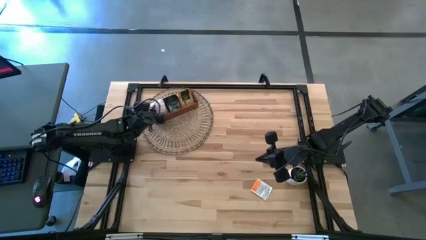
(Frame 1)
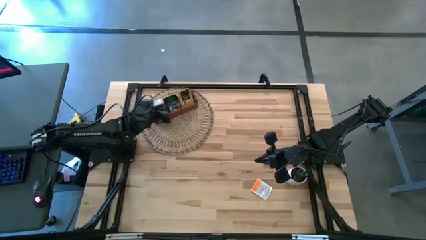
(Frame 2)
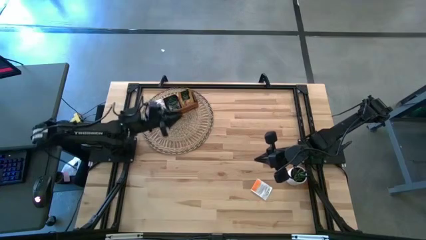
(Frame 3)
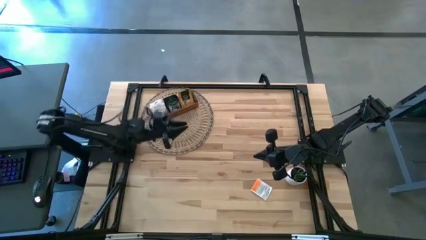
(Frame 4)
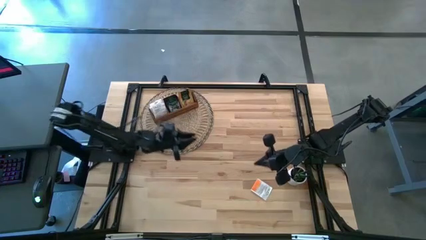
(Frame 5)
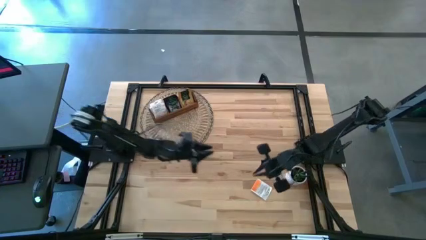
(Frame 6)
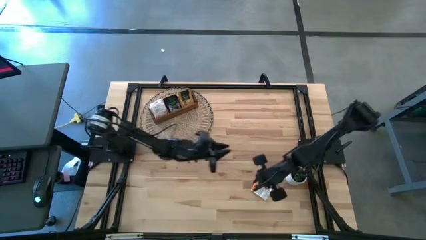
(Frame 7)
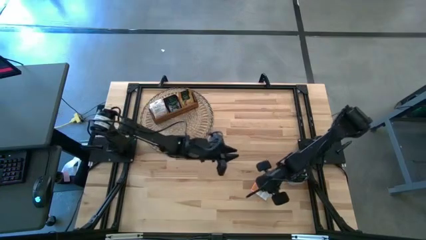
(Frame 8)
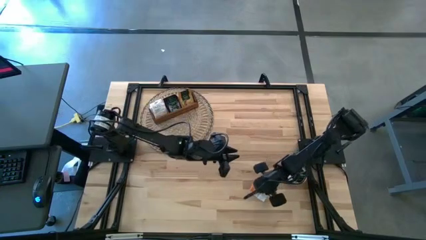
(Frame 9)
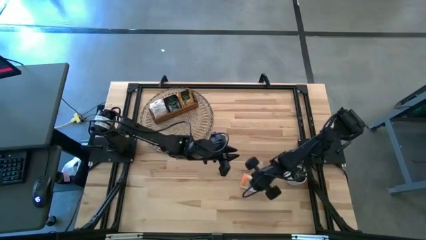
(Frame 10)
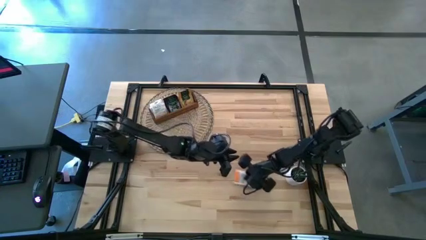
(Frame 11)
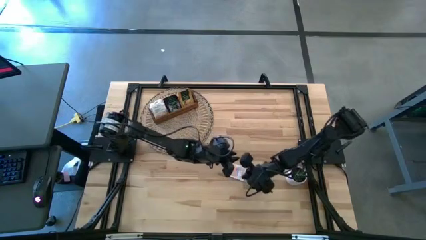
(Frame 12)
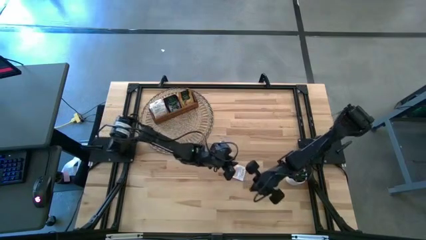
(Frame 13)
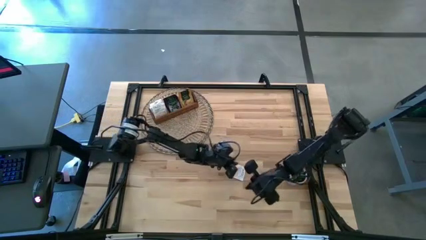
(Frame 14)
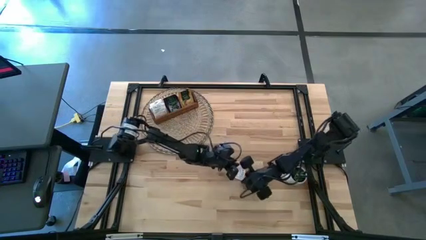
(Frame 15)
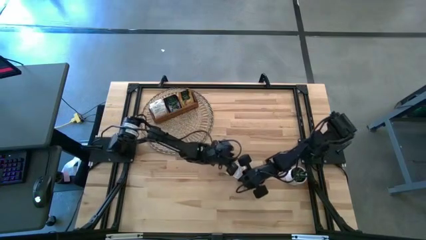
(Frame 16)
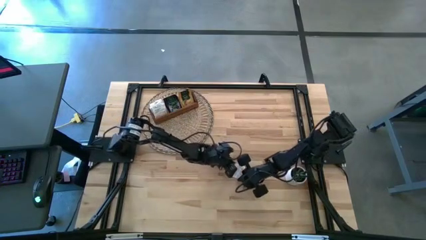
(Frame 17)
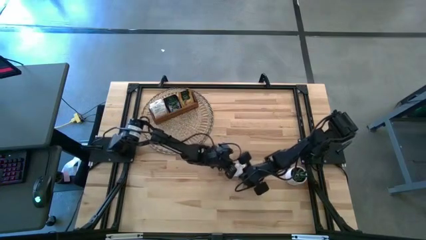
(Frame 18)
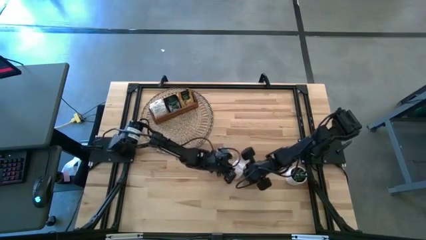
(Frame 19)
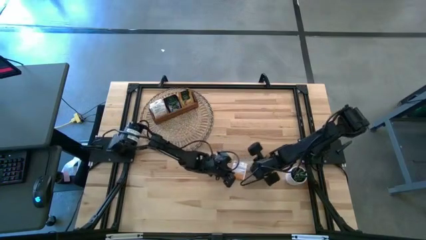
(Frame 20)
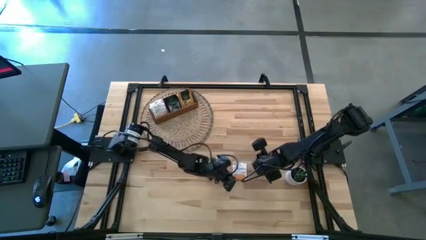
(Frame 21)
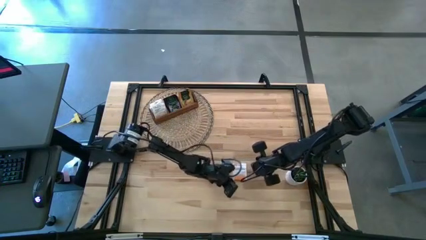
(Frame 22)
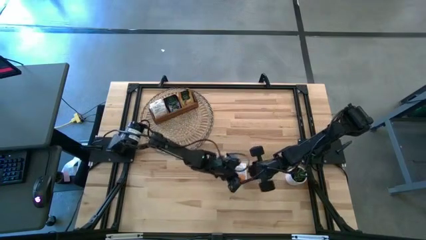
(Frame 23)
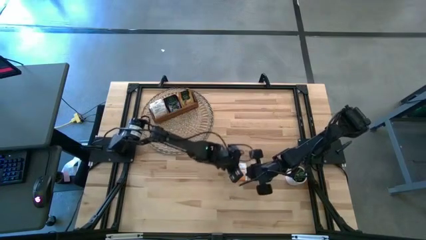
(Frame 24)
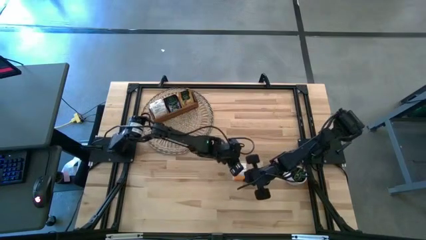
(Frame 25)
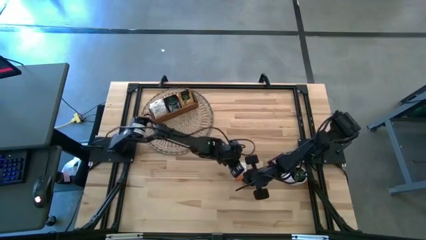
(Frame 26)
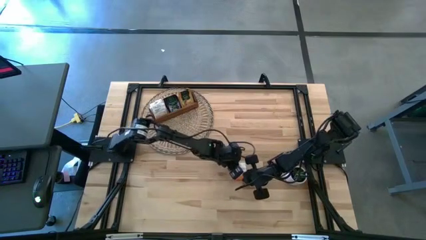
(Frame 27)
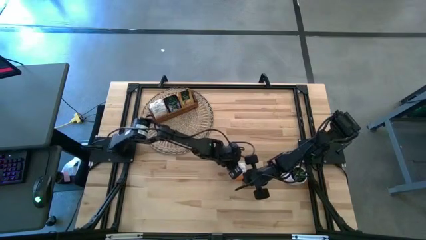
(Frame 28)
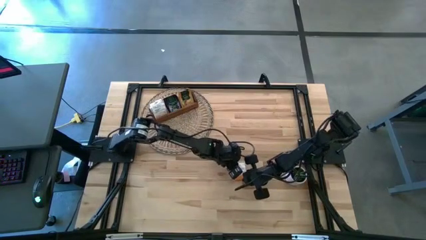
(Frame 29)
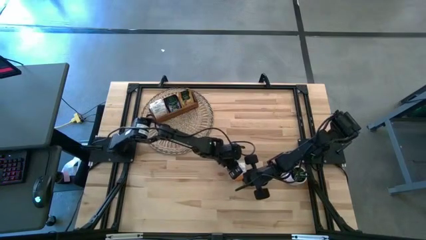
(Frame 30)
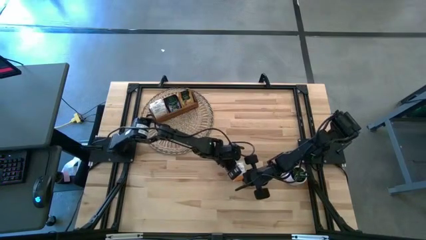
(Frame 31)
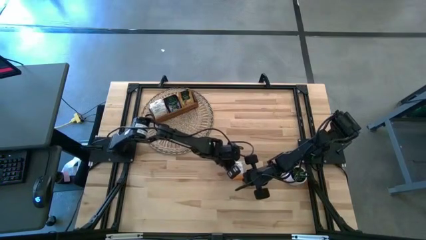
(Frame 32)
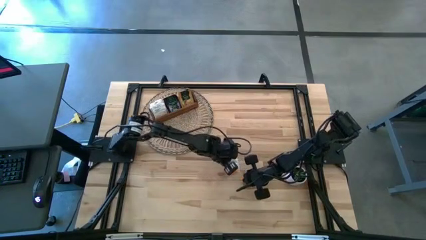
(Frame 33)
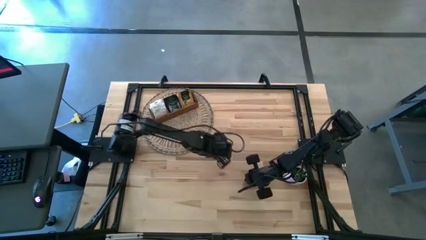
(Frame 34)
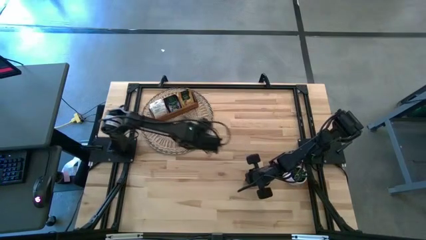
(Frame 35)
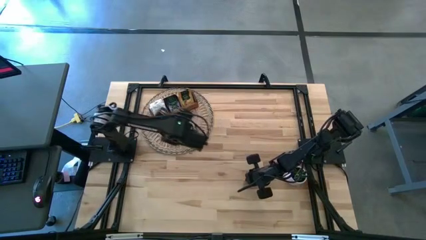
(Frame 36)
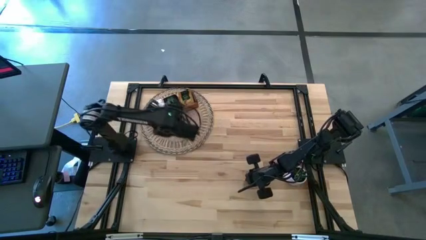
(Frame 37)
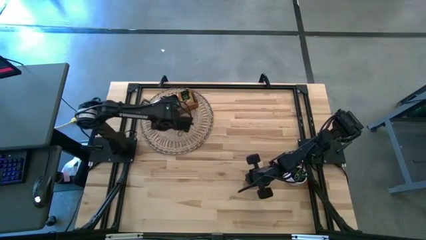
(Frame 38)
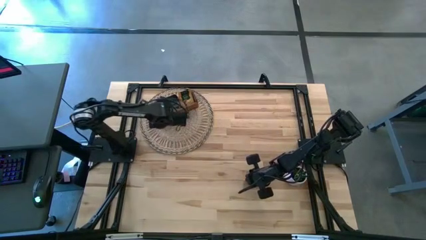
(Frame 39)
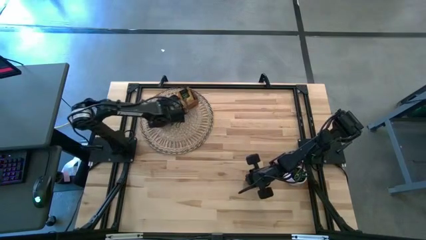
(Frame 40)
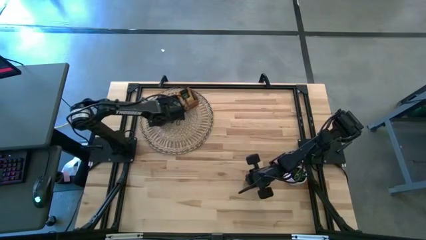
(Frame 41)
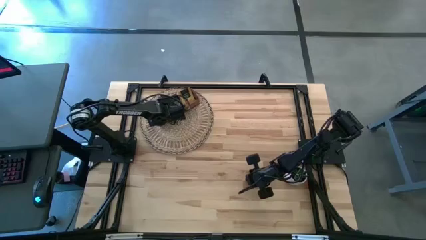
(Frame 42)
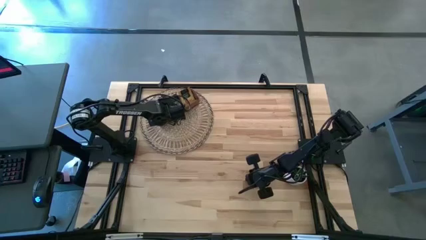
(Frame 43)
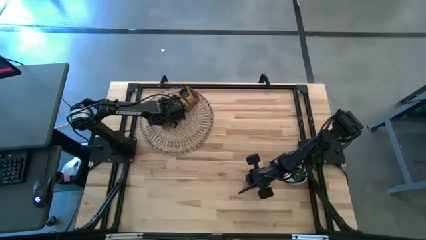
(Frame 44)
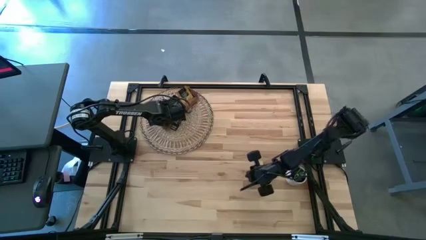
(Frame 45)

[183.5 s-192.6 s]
Task: Pick & Place Tea
Put the orange tea bag into the left section of the wooden organizer

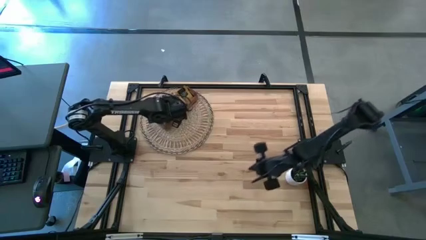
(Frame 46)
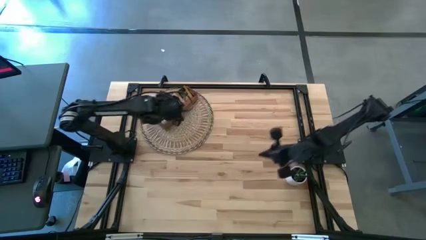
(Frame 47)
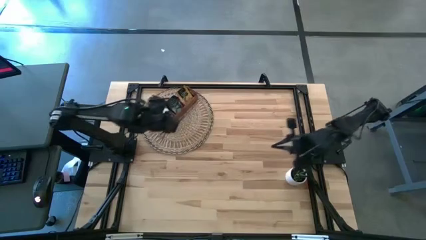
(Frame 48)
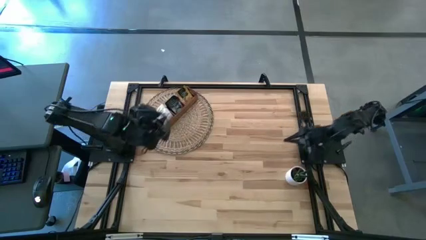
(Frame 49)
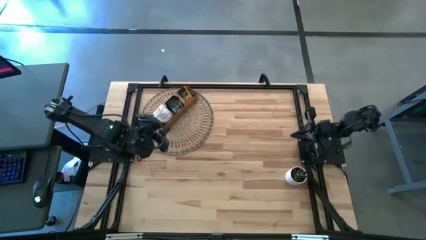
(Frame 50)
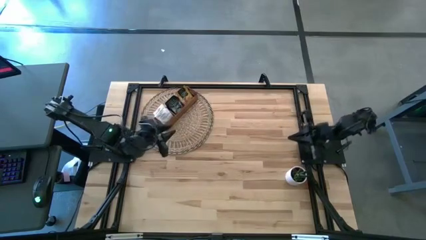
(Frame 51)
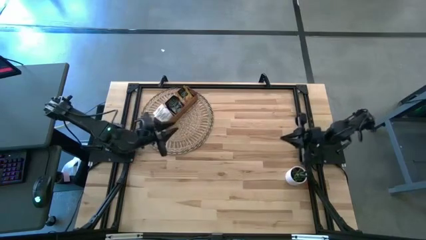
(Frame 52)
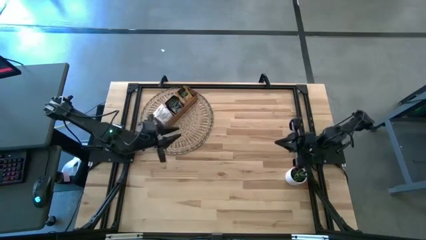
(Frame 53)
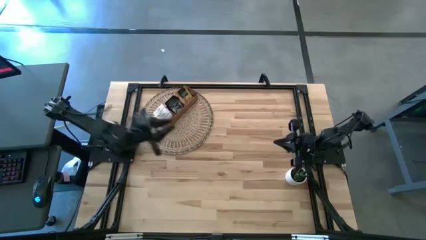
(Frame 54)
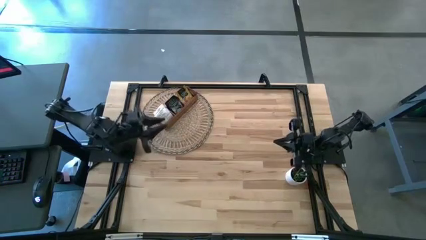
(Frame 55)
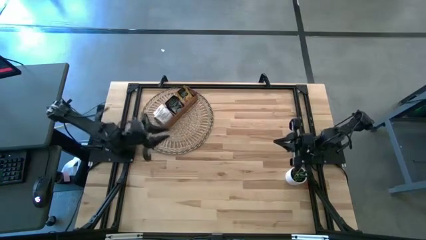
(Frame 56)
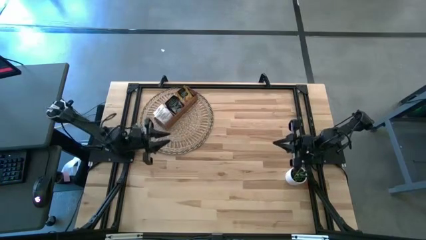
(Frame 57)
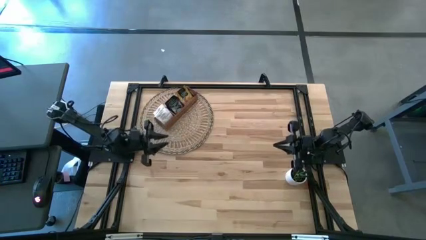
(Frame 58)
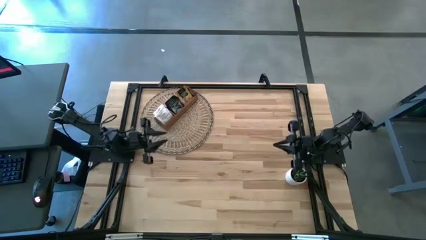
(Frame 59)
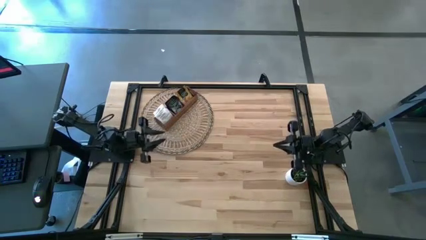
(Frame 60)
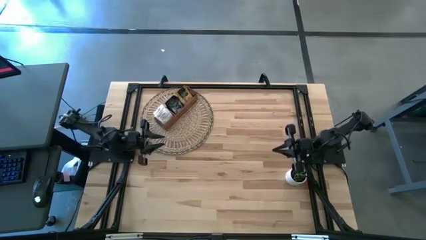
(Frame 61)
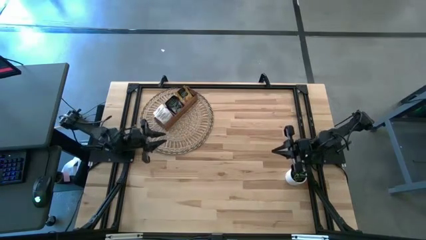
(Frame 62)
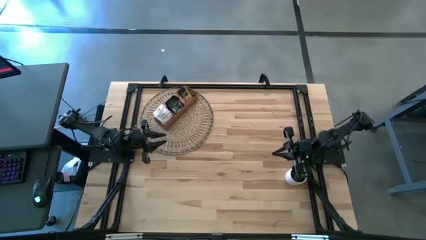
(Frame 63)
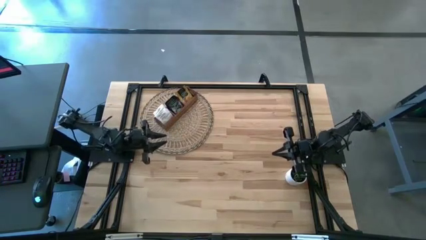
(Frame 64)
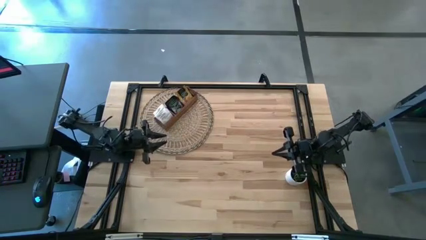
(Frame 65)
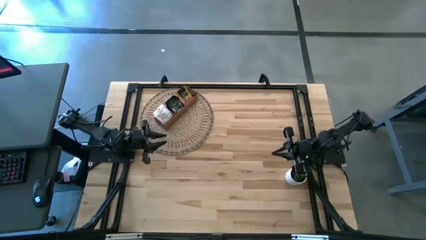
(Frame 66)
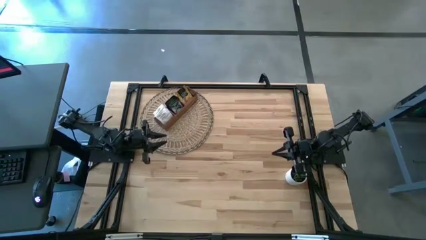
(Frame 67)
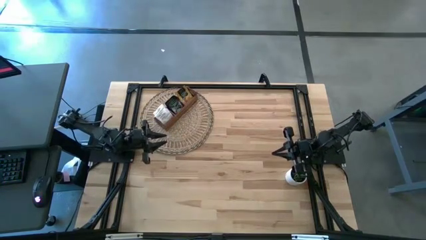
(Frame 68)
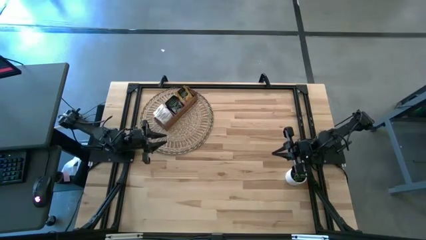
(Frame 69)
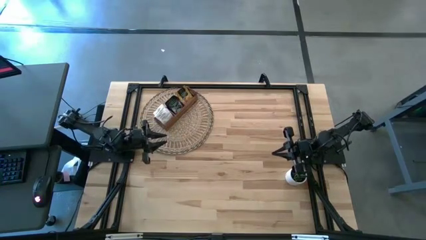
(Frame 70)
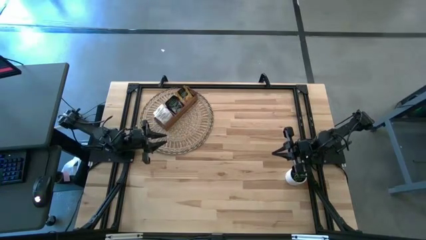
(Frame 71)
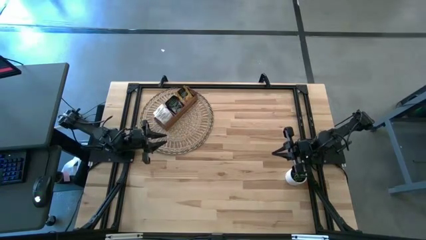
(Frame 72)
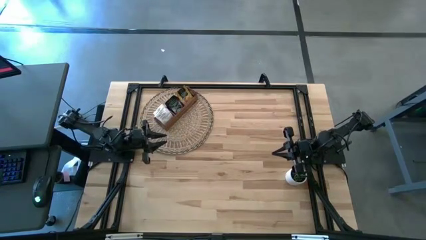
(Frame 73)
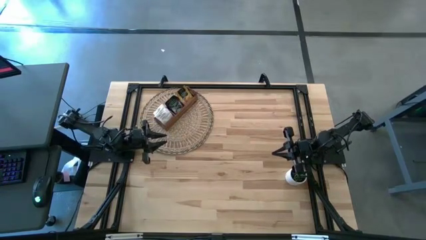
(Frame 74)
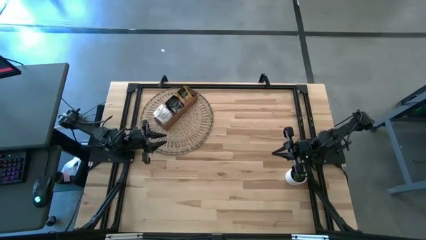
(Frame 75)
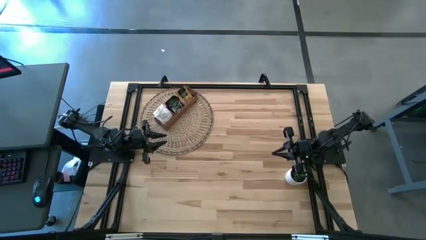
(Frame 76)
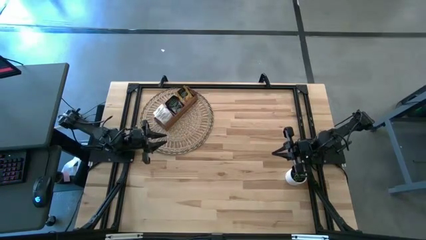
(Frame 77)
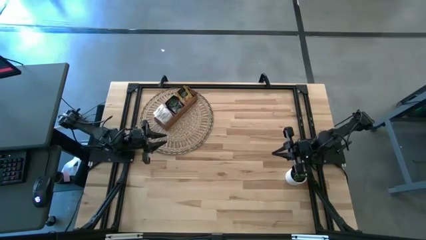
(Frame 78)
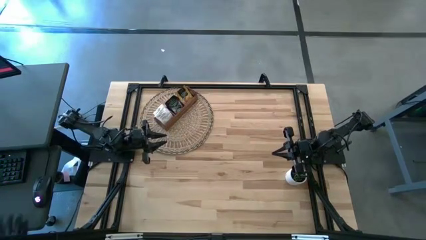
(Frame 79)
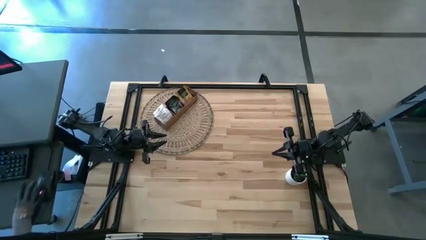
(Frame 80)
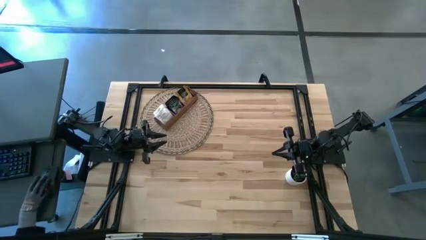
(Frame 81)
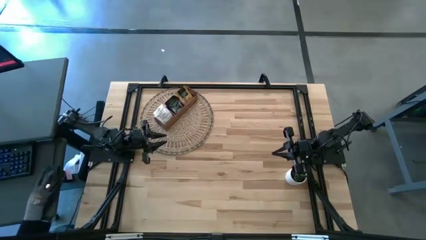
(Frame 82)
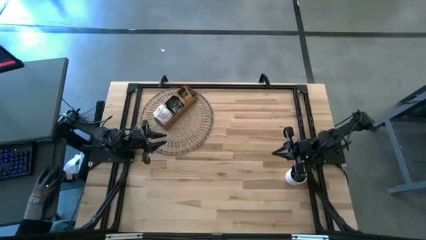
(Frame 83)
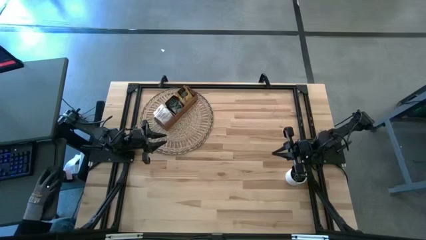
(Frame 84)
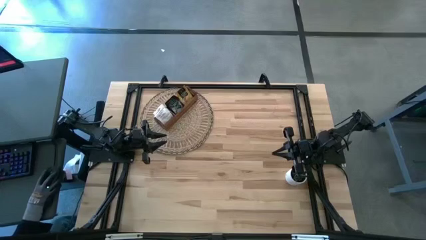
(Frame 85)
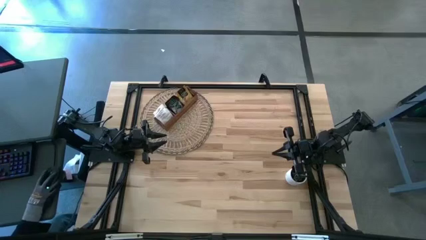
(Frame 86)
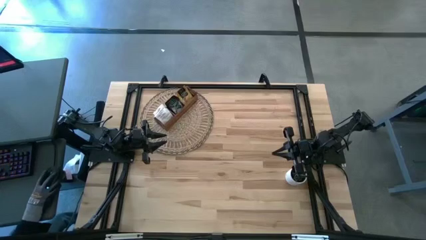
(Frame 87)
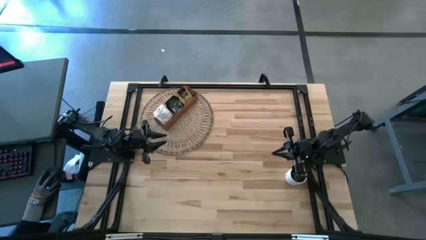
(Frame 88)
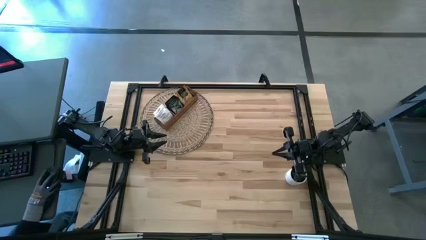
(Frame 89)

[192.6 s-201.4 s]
Return to Home Position
